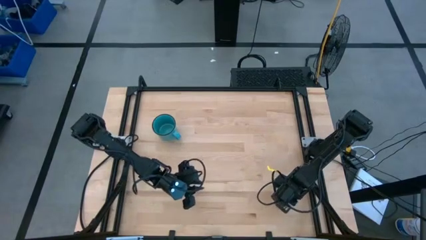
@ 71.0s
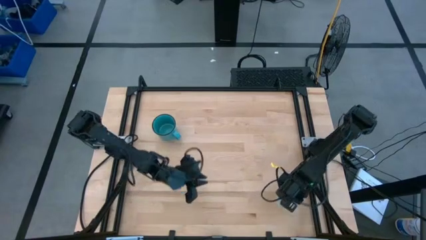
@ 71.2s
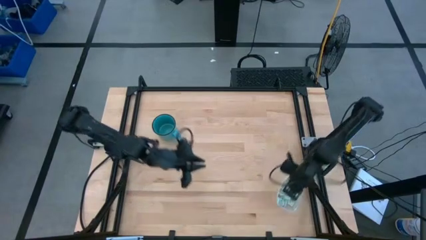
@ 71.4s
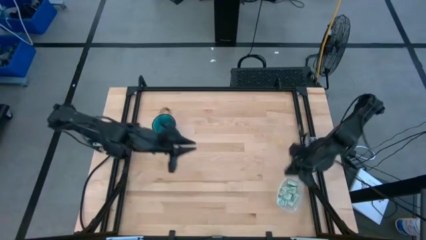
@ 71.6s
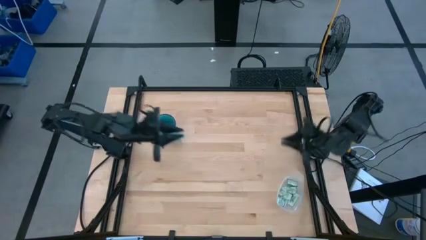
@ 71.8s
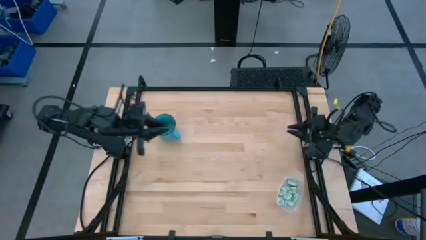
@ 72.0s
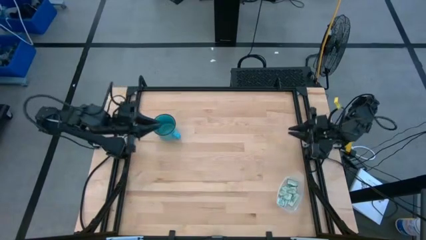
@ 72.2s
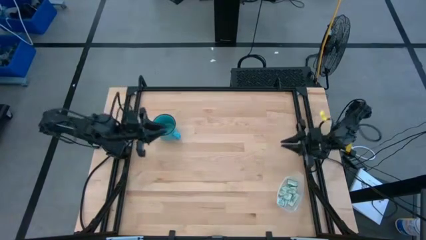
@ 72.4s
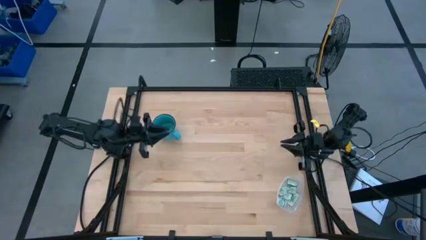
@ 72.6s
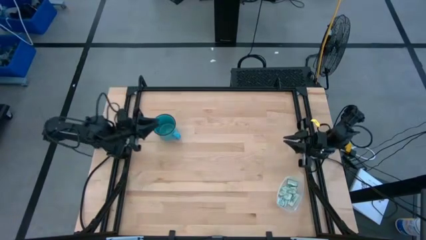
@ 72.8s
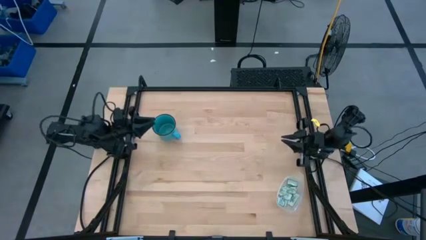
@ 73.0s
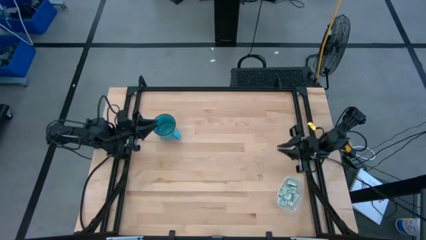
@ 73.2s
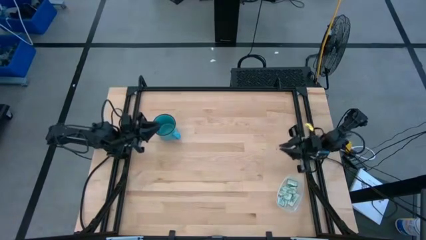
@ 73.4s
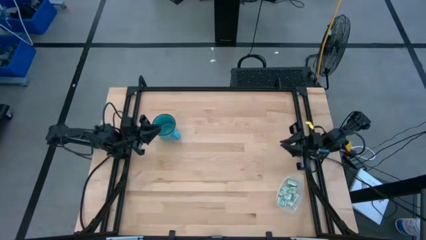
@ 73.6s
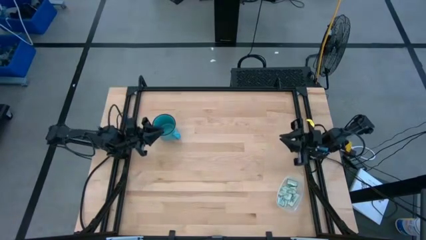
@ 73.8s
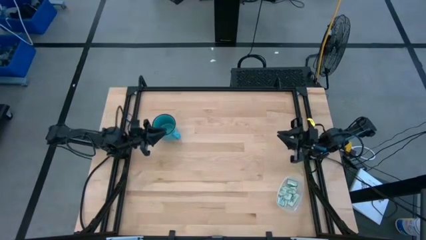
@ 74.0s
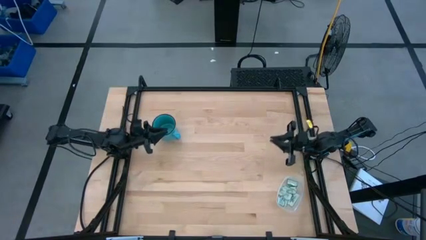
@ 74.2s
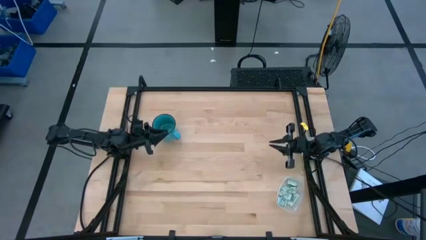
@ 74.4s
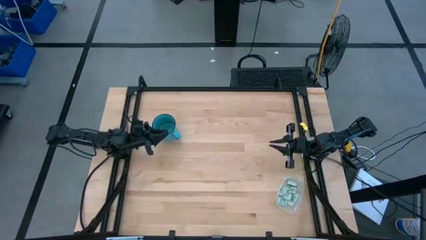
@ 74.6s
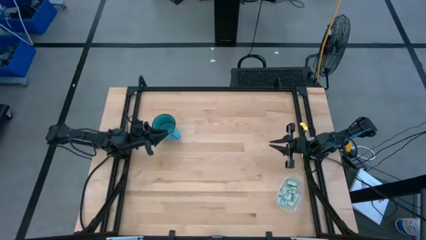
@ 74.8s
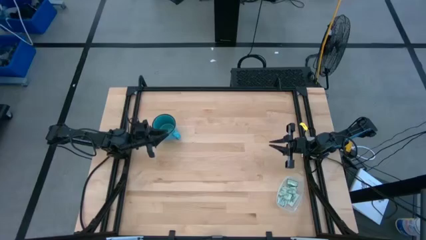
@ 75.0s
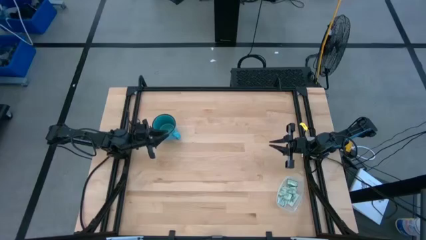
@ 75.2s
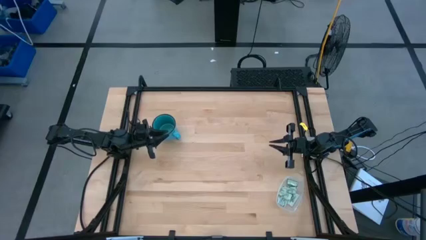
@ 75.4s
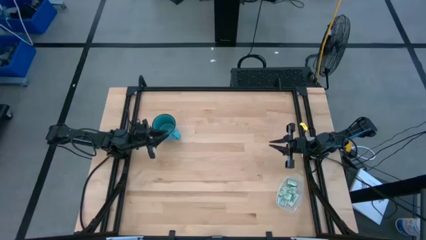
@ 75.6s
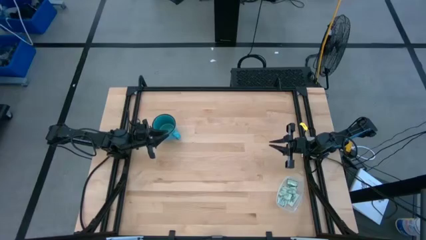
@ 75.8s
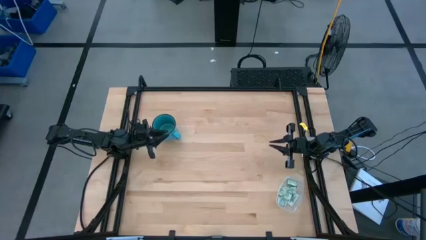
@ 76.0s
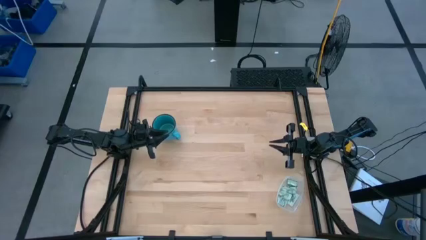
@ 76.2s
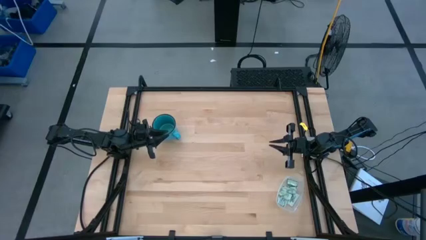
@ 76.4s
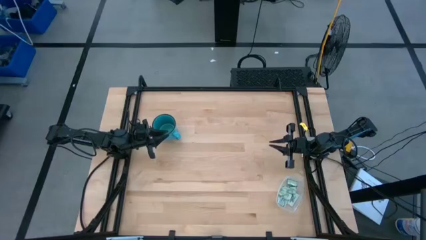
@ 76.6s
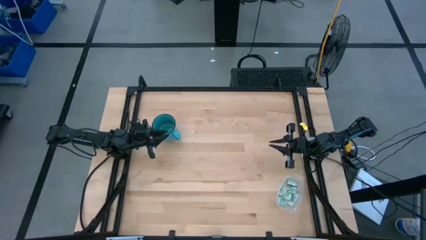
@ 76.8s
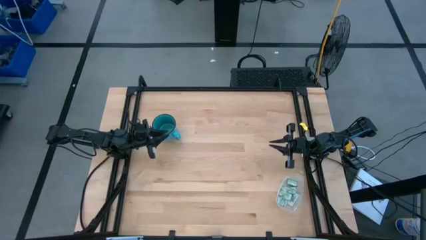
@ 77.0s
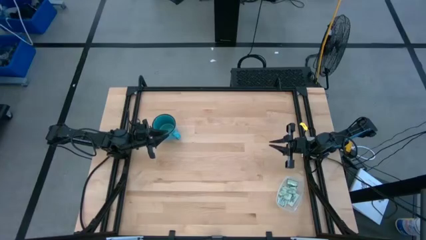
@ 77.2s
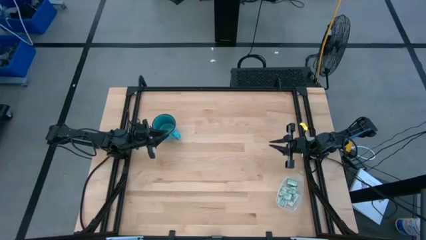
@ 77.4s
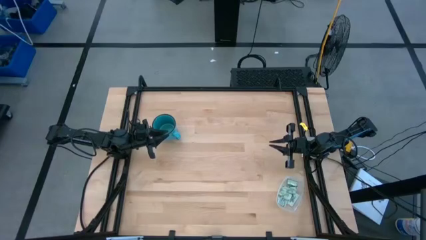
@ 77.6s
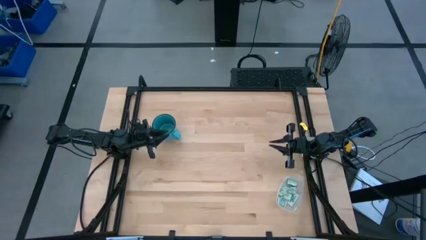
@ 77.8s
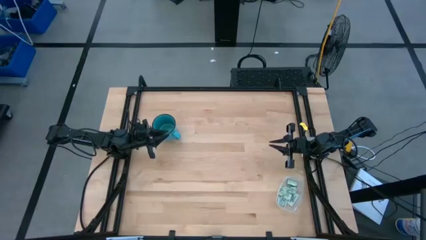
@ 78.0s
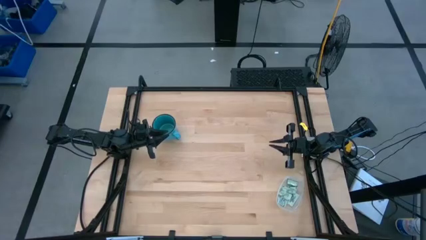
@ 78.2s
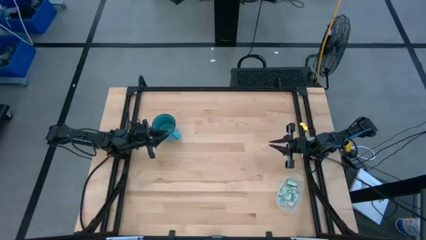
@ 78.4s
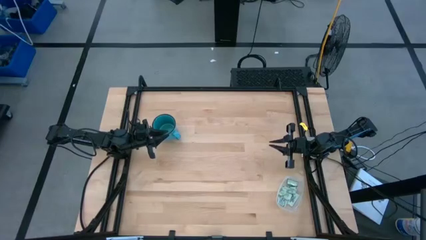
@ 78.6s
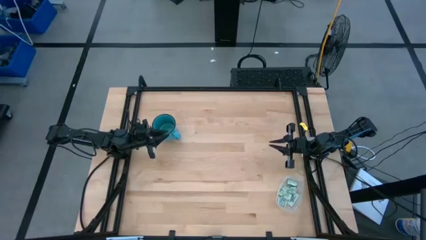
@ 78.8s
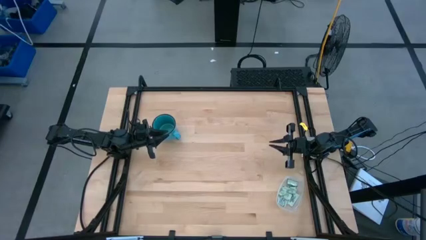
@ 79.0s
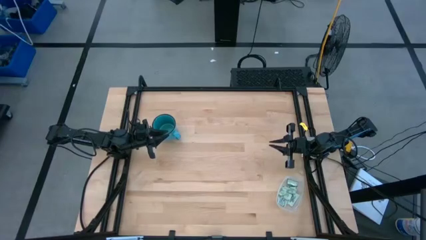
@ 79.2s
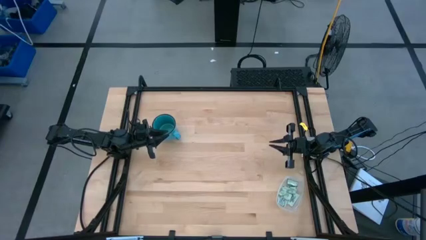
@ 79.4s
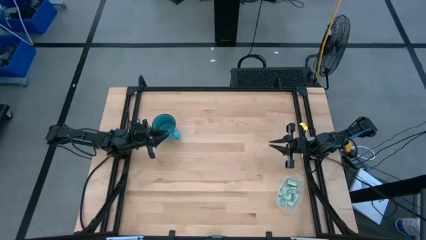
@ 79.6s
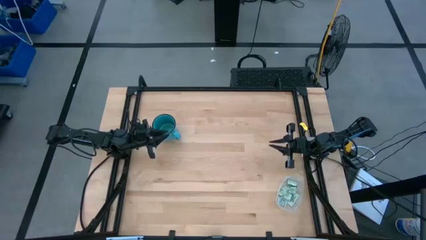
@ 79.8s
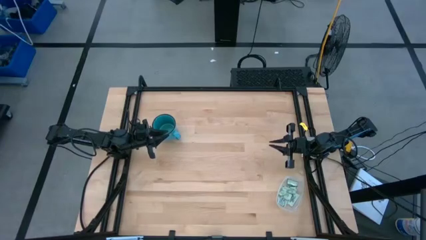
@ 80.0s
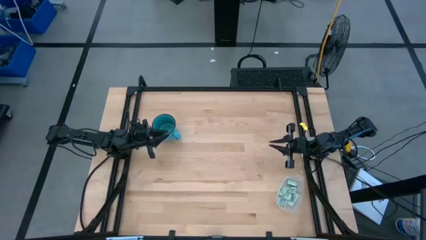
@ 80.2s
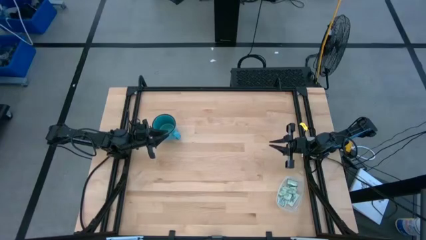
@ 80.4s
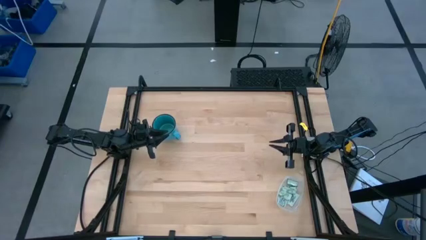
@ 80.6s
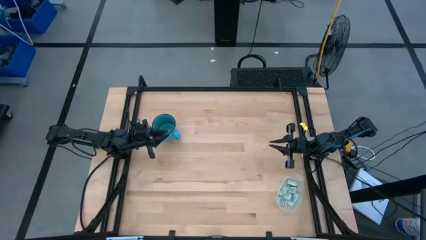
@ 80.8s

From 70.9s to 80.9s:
Task: Pick and place Stevia / Truvia into bins
Return to Home Position

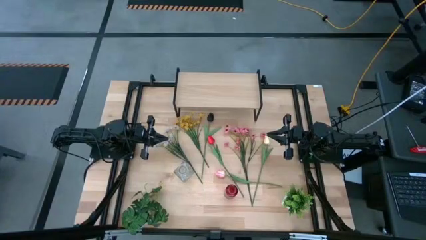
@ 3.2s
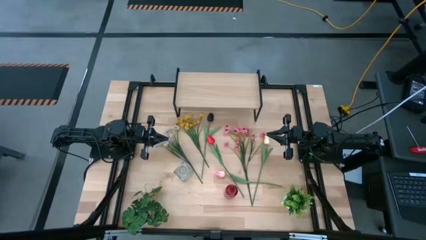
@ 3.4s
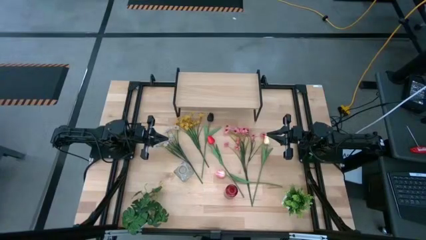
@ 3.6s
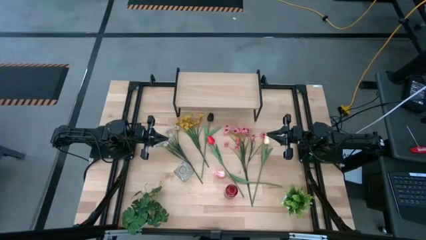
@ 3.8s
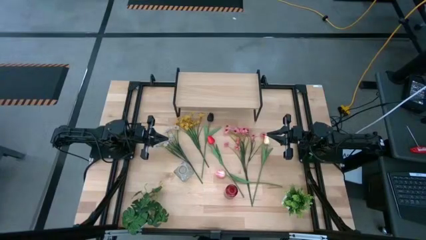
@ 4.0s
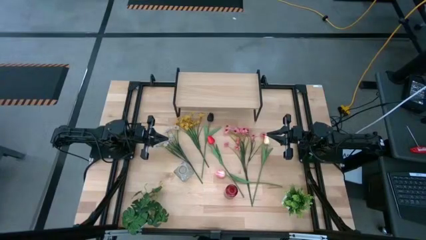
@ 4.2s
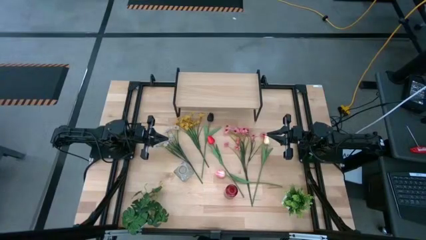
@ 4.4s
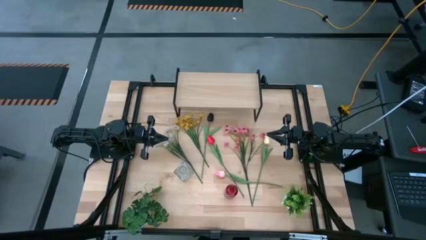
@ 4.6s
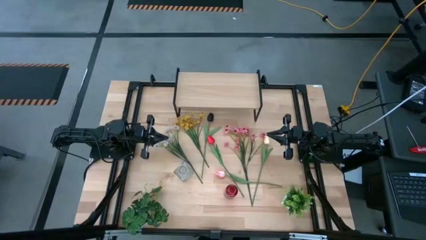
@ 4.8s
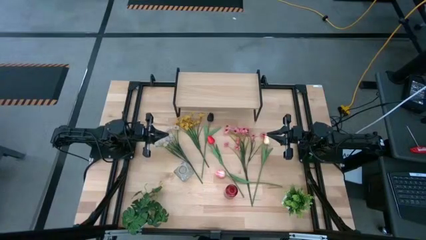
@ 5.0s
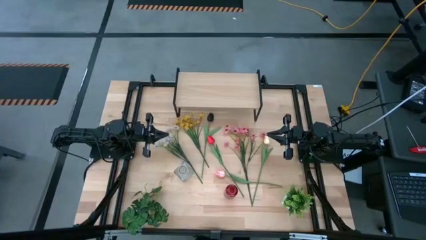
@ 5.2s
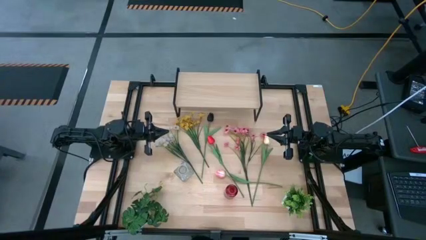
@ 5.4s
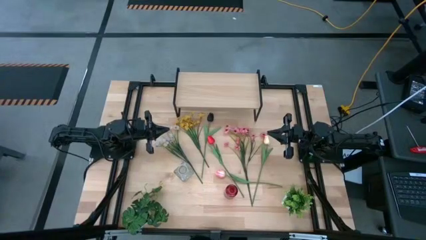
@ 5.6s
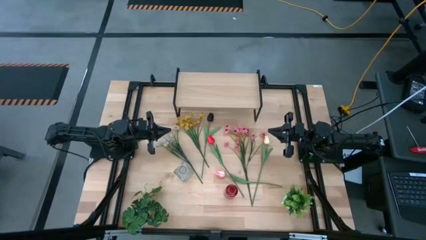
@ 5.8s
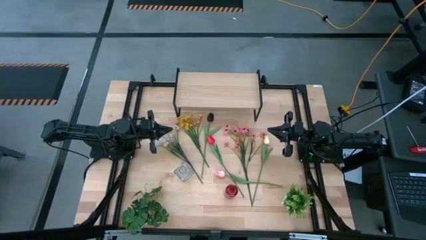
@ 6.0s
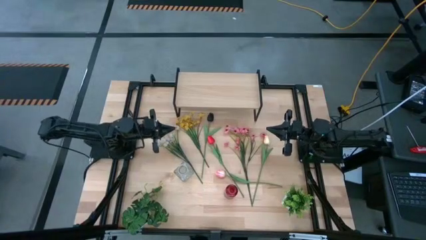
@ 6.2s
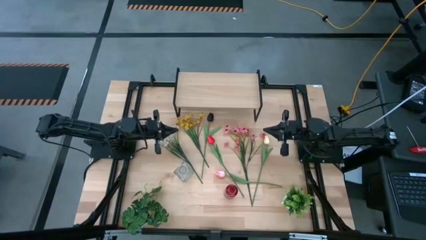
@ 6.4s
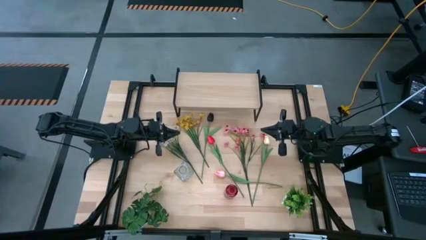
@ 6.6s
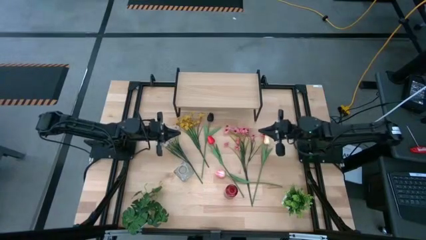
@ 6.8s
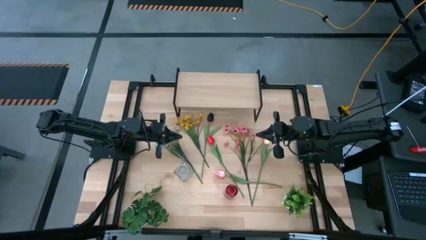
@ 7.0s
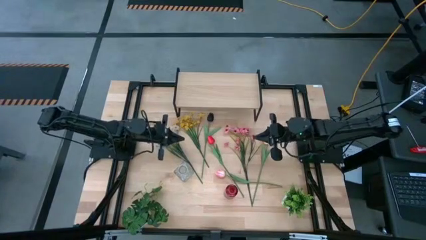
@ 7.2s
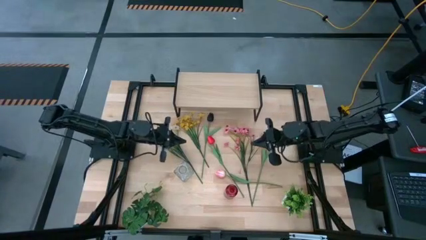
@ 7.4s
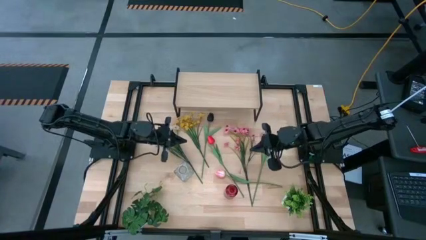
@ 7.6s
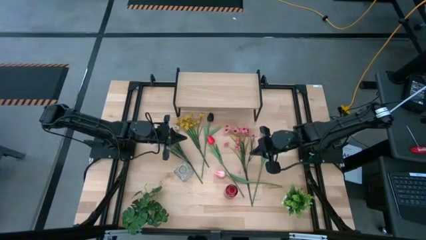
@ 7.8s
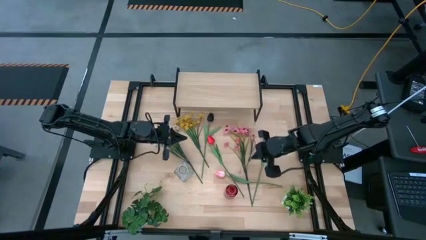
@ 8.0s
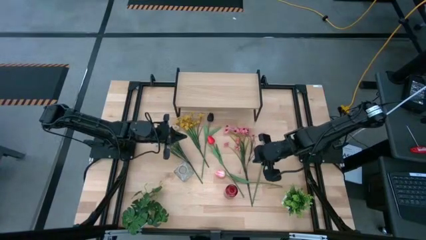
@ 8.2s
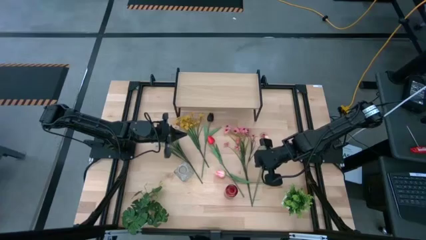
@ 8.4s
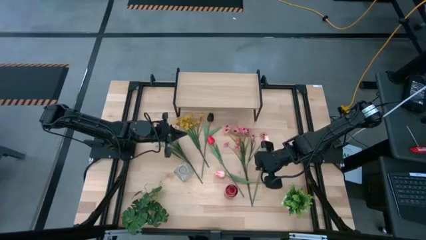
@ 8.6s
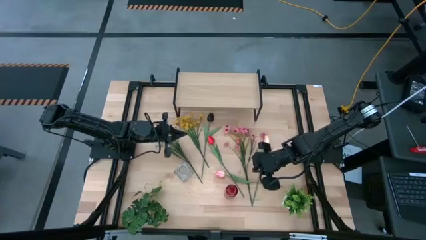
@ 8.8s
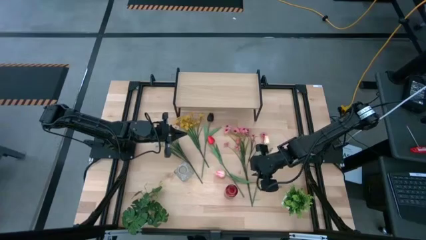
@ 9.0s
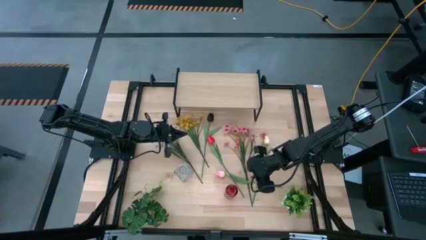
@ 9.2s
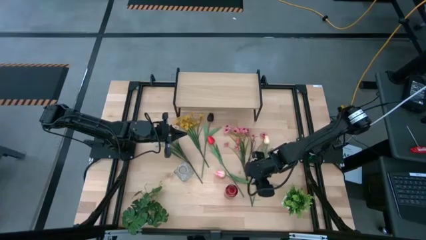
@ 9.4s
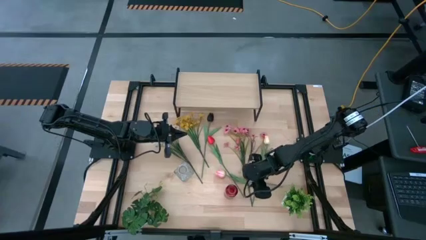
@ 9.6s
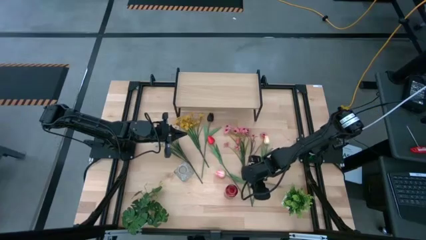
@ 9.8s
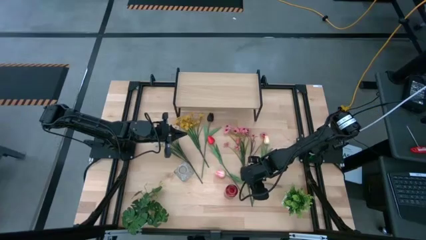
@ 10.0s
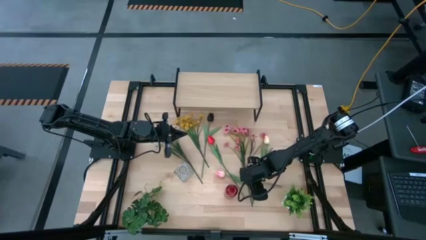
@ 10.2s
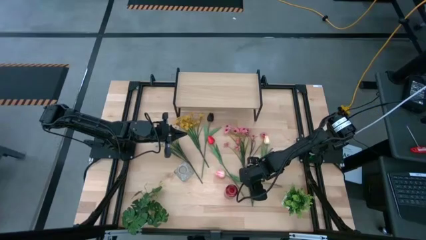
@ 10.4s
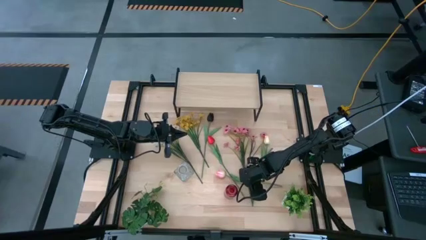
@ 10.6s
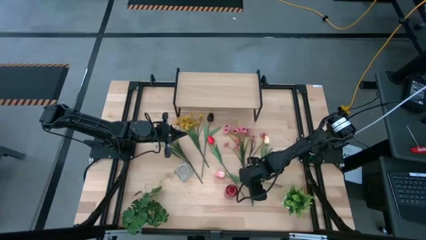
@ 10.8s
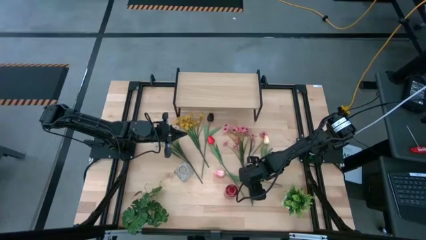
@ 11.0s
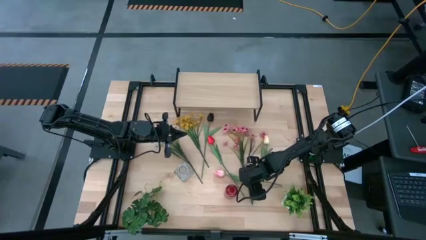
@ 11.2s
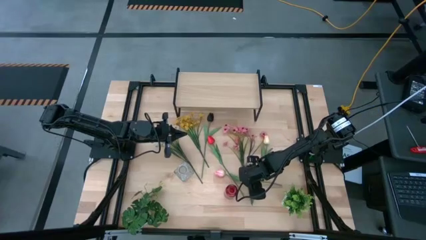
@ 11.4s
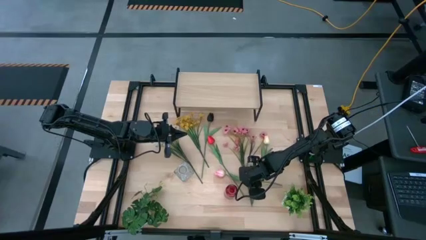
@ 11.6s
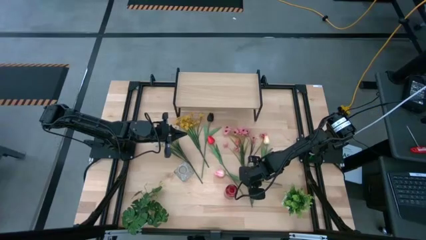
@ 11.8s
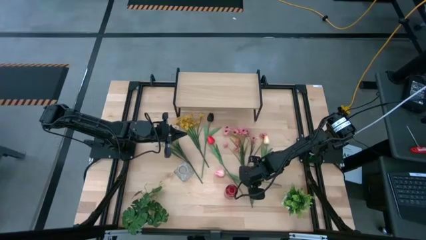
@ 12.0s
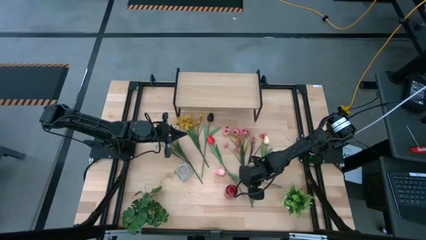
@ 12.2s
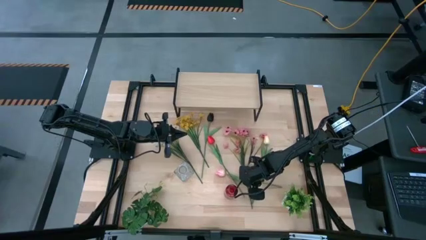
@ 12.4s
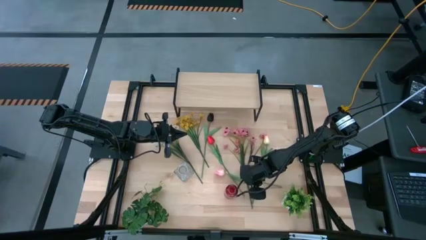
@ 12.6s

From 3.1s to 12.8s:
Task: Pick and place flowers into a vace then onto a shelf
Put the pink tulip into the red vase
